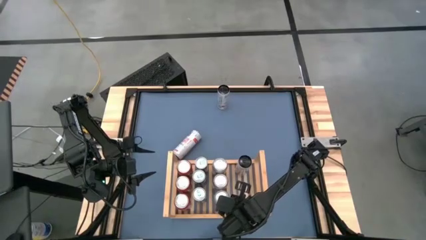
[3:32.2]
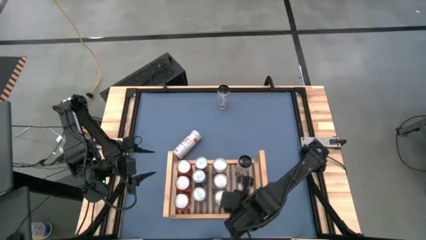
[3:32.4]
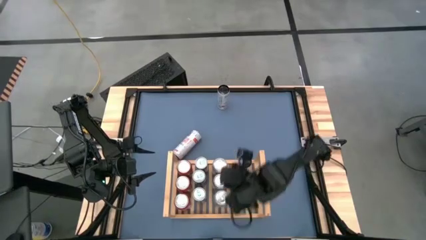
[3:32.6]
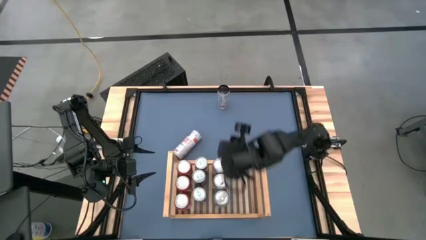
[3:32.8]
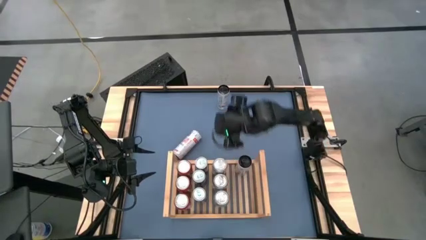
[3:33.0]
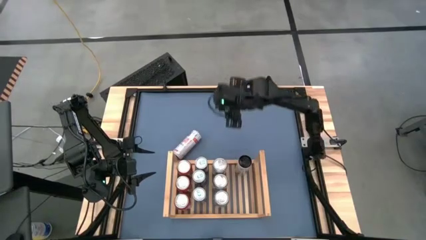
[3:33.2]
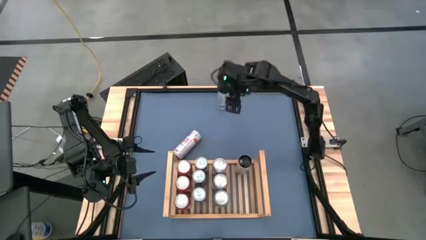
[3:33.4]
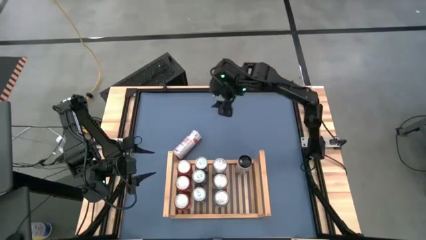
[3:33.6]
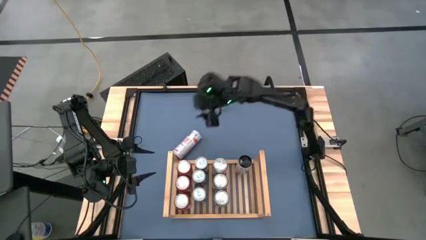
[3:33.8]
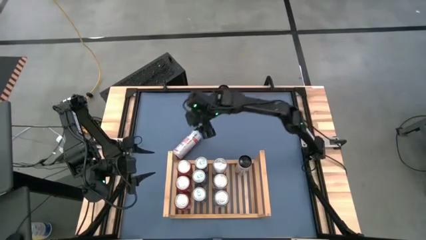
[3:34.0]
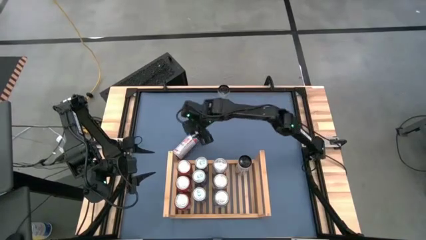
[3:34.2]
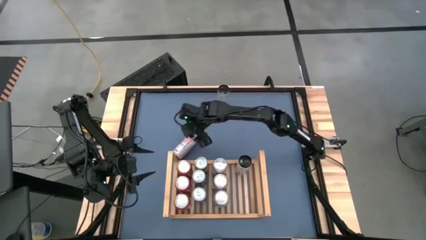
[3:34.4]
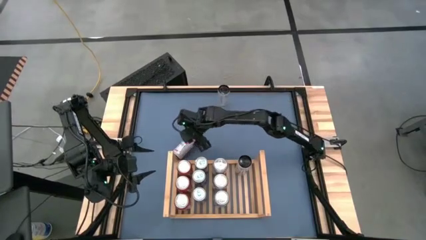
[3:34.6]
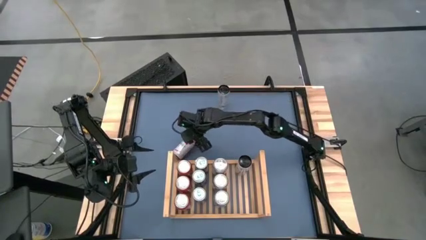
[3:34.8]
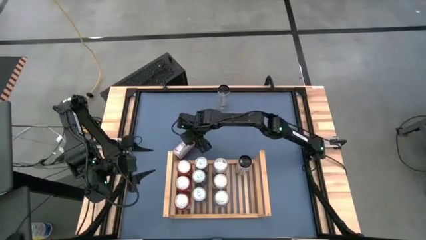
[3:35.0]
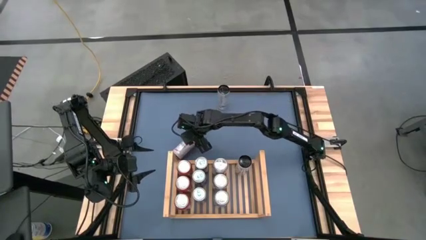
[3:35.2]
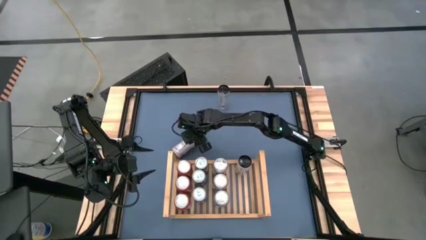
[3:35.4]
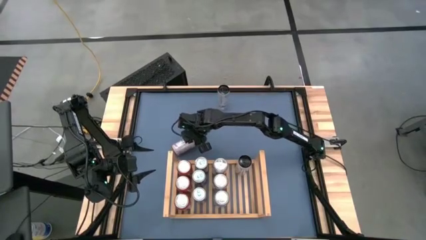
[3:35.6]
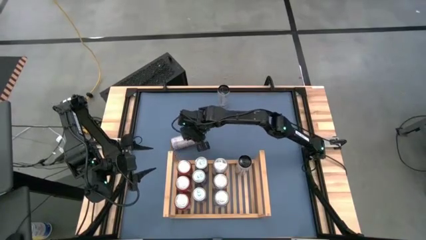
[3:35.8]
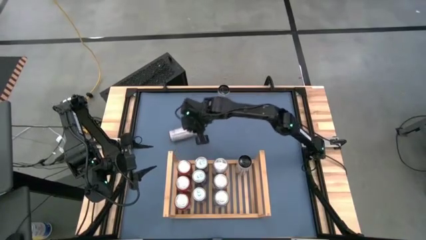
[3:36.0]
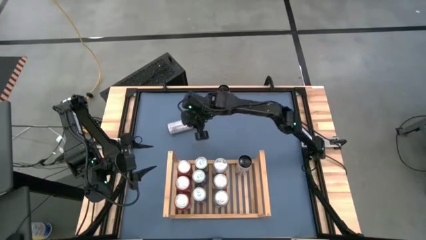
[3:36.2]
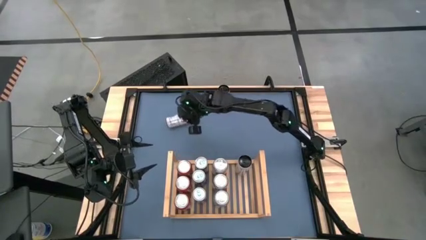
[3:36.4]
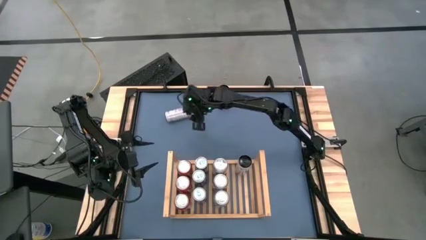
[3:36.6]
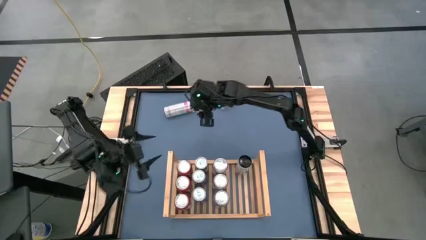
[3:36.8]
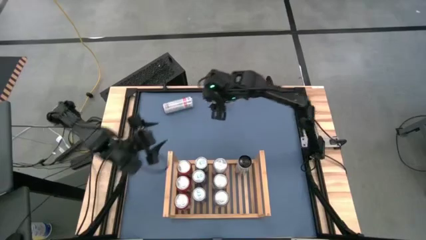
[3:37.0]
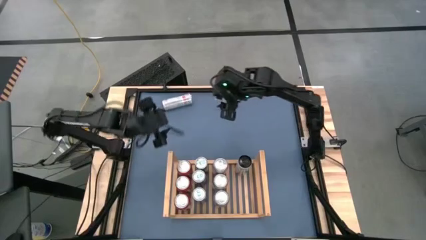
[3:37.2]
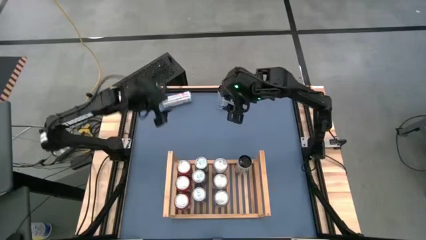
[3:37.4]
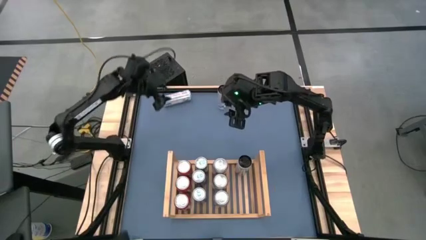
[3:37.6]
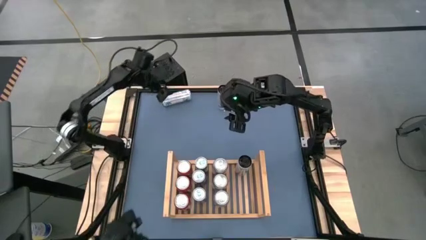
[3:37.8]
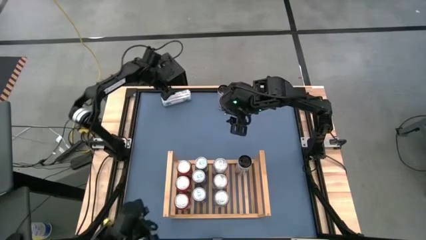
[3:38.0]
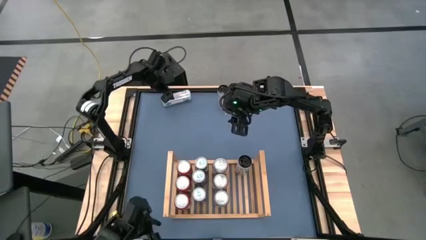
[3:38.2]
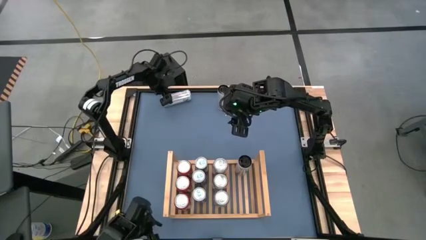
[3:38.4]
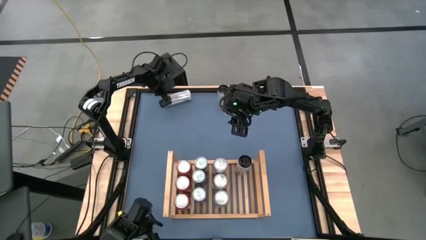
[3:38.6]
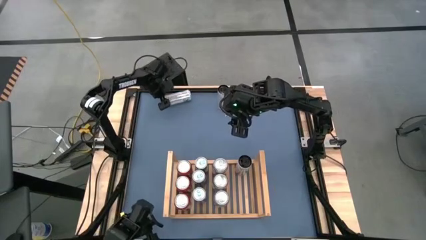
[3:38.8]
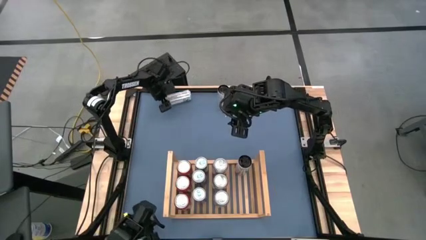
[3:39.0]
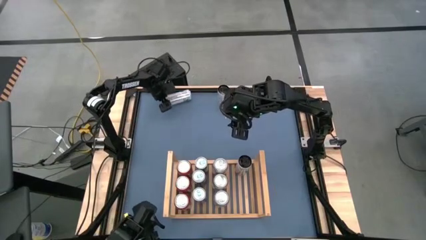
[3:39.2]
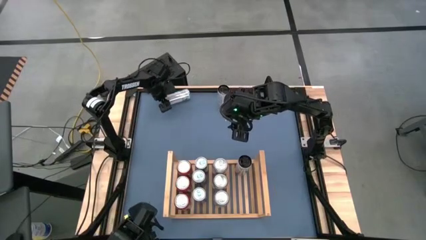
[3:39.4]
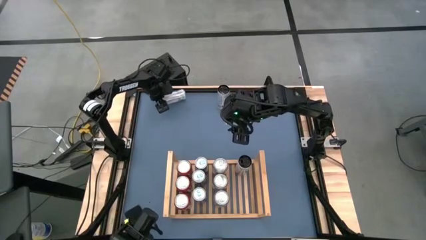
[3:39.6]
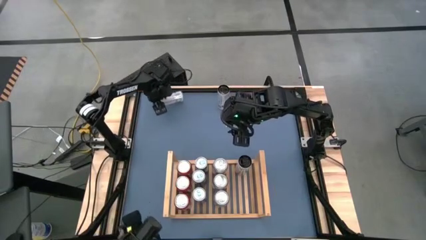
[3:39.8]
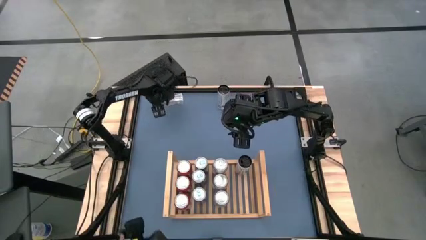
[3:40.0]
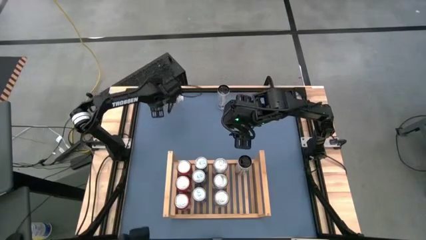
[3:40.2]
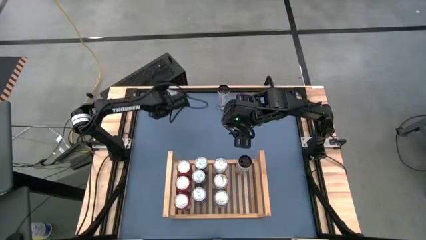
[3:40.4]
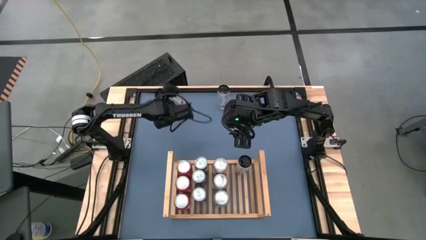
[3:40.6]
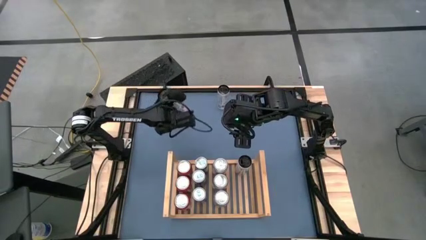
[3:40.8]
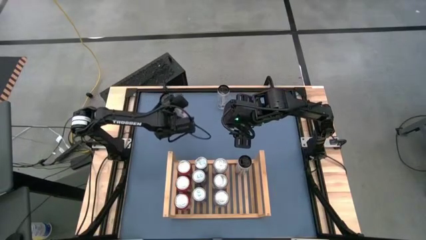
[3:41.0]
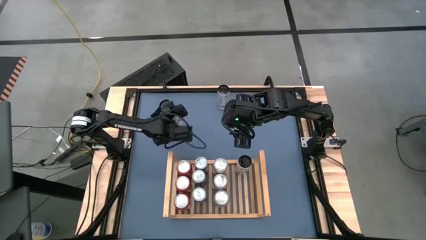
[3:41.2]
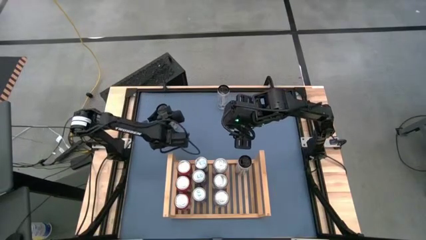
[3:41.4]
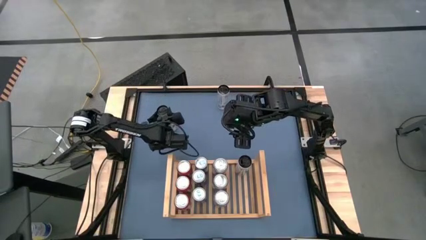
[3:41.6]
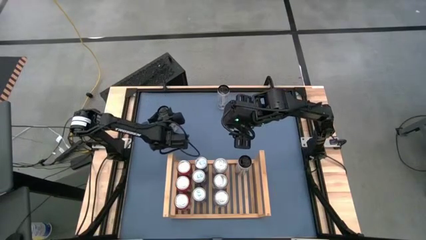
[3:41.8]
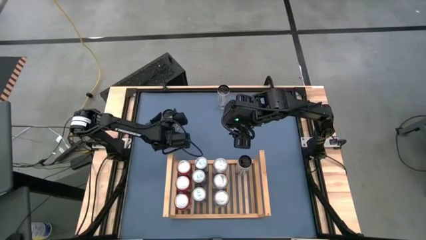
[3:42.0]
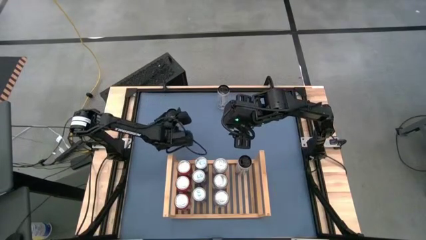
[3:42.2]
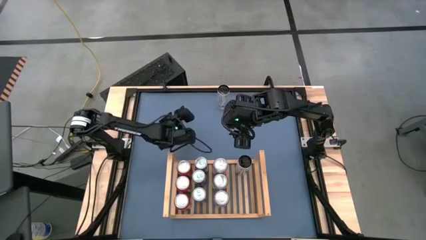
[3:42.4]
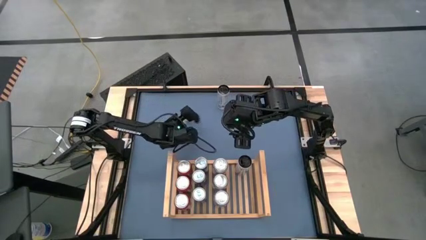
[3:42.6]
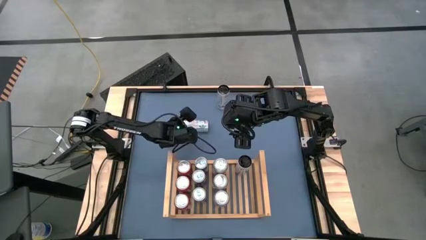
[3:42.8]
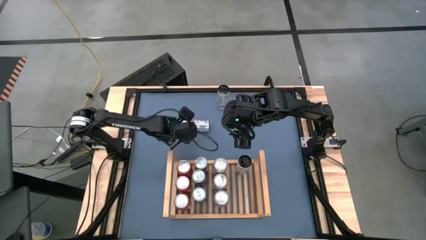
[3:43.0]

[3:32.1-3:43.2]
Task: Place canned beverage on shelf
Put the white-pink soda can on the shelf aligned with the other white-pink soda can
